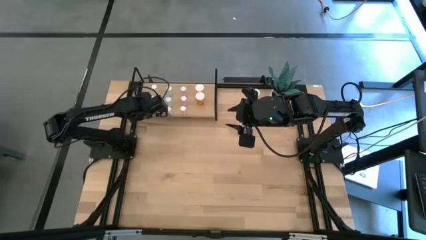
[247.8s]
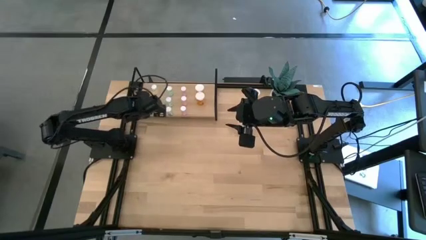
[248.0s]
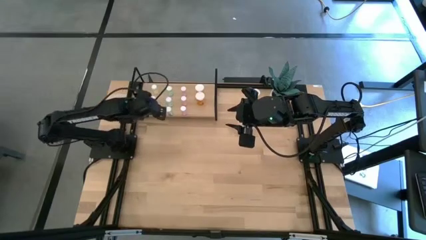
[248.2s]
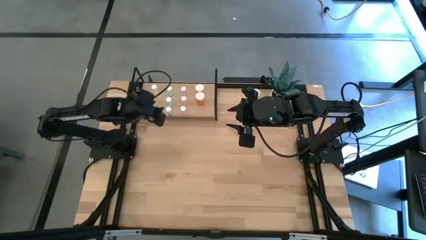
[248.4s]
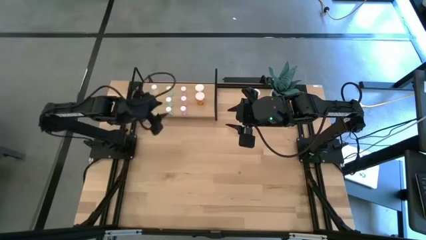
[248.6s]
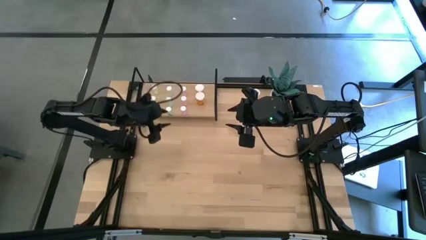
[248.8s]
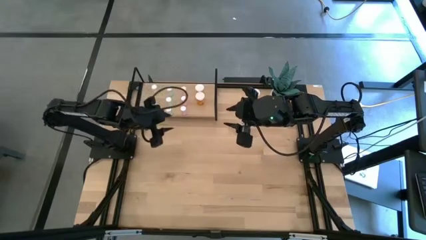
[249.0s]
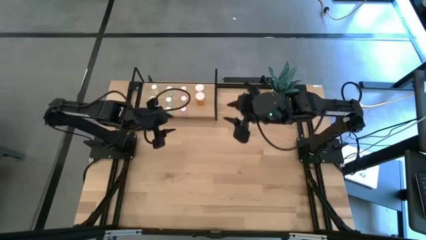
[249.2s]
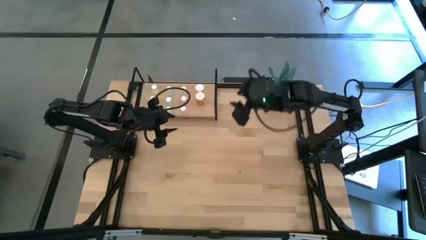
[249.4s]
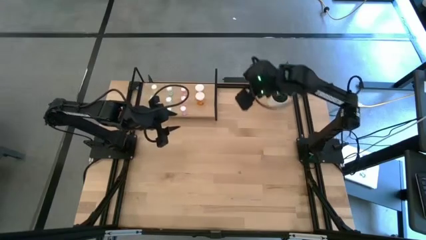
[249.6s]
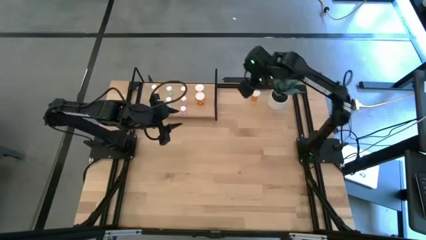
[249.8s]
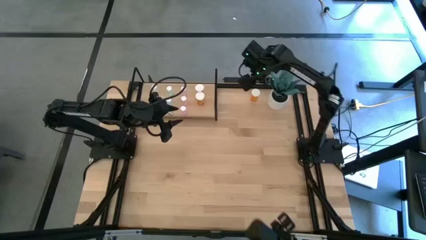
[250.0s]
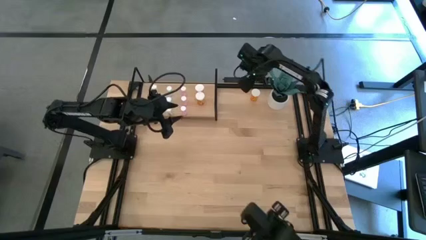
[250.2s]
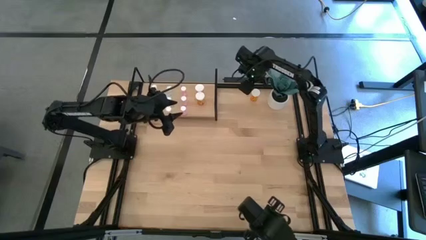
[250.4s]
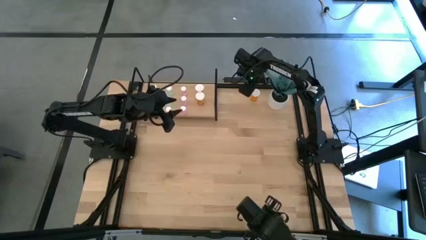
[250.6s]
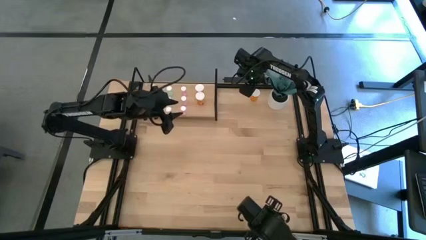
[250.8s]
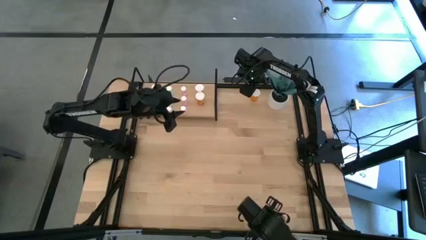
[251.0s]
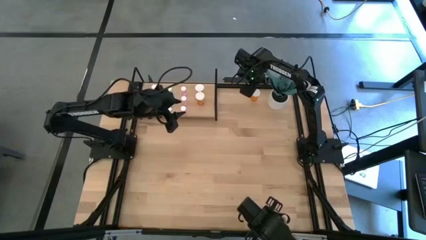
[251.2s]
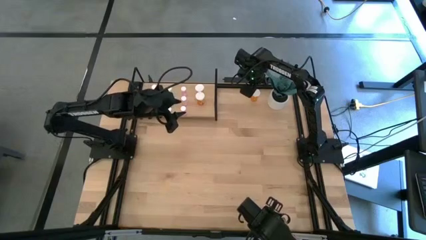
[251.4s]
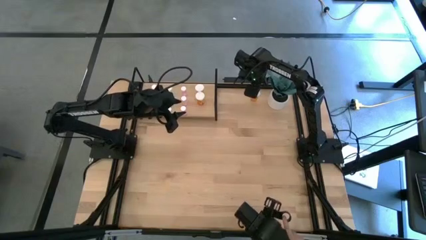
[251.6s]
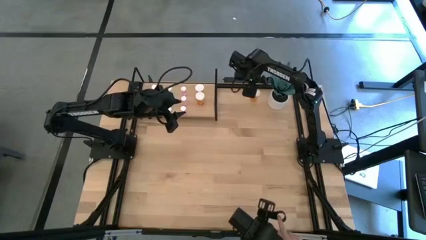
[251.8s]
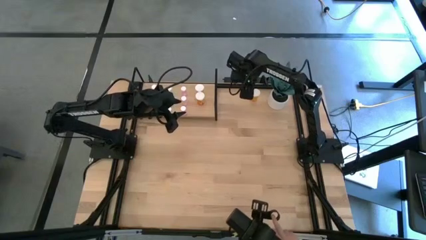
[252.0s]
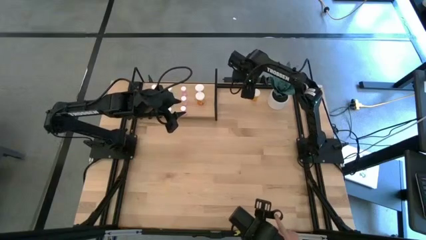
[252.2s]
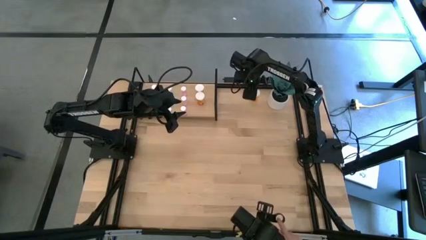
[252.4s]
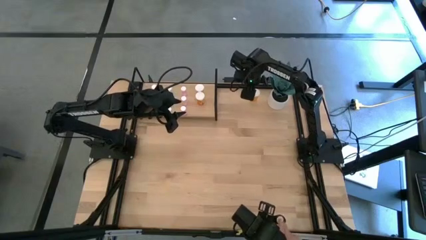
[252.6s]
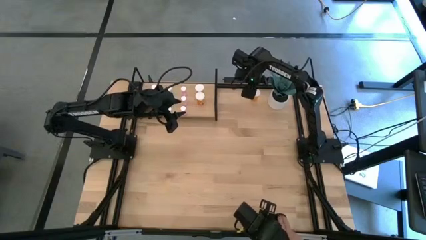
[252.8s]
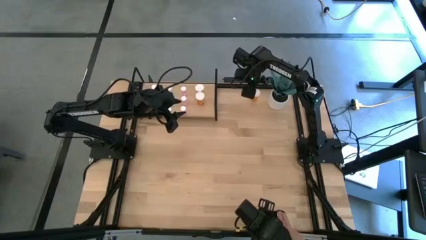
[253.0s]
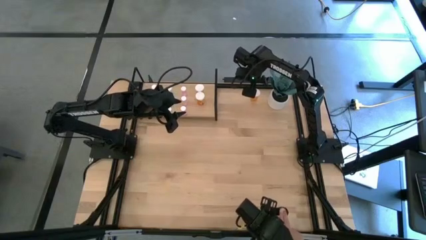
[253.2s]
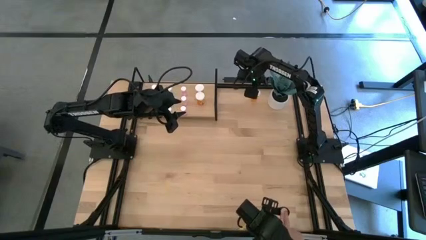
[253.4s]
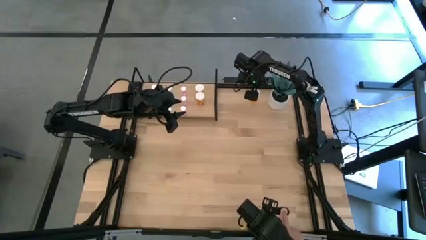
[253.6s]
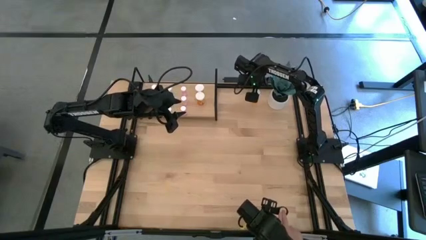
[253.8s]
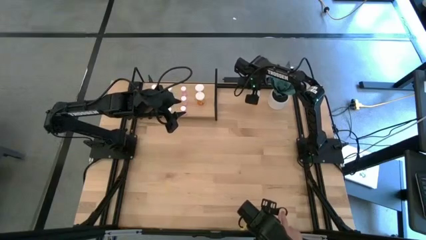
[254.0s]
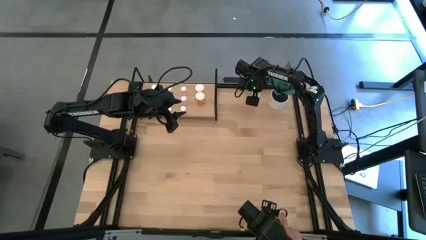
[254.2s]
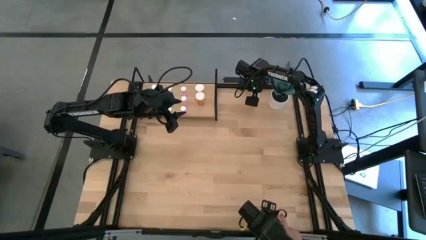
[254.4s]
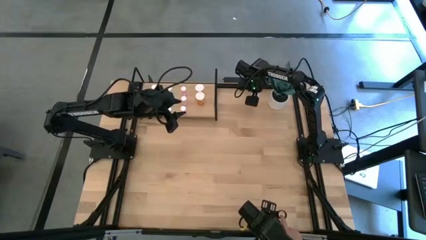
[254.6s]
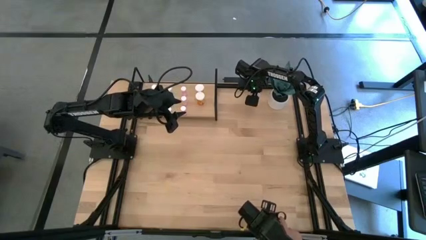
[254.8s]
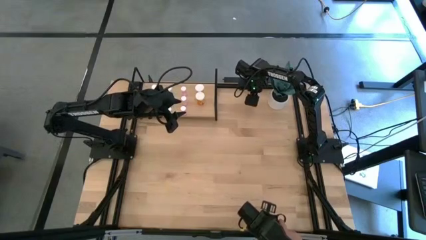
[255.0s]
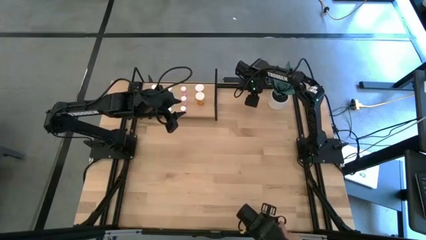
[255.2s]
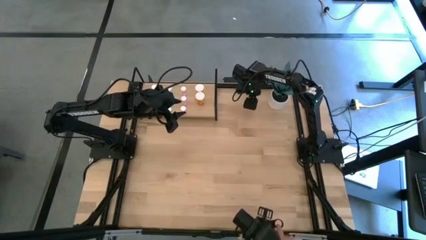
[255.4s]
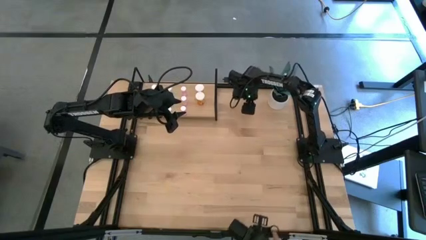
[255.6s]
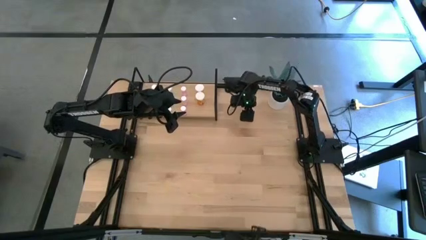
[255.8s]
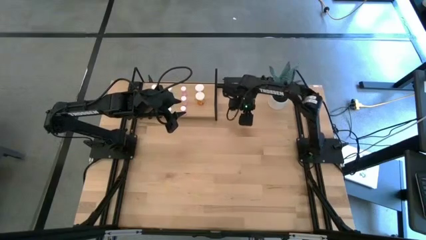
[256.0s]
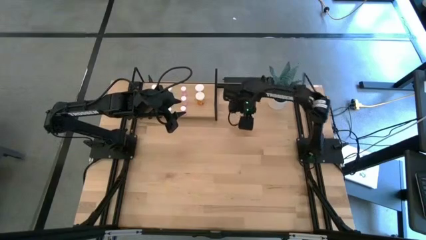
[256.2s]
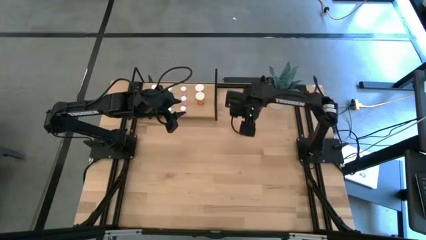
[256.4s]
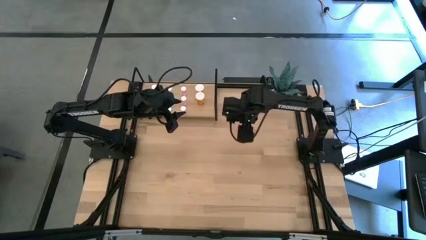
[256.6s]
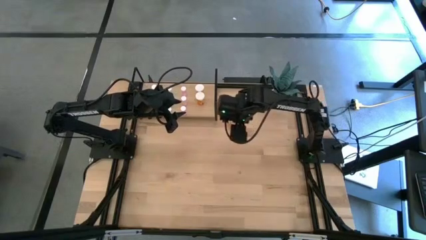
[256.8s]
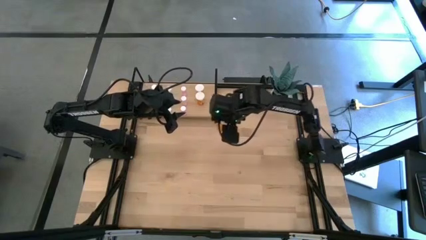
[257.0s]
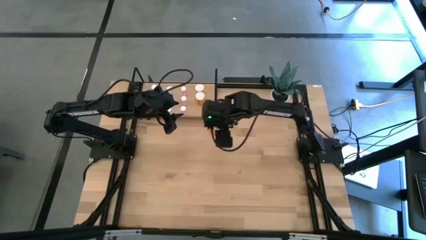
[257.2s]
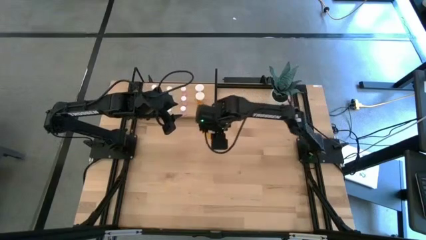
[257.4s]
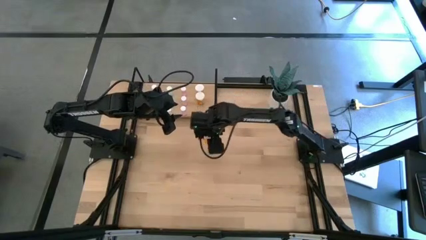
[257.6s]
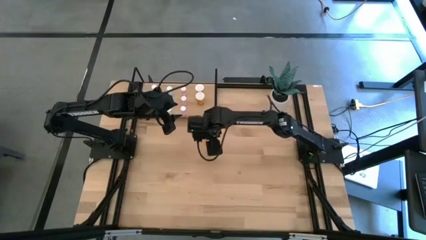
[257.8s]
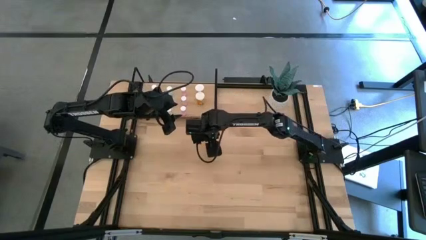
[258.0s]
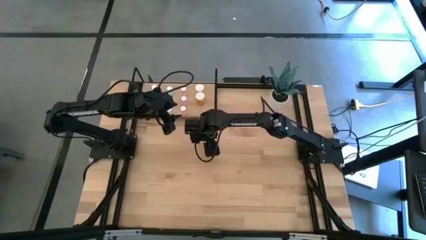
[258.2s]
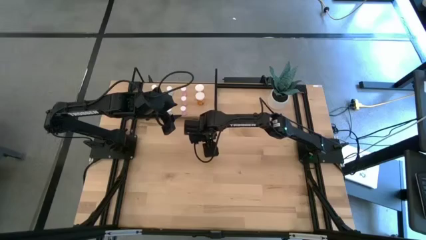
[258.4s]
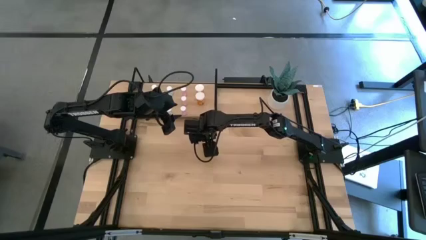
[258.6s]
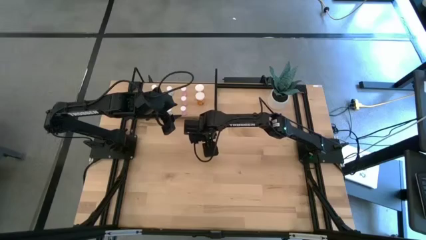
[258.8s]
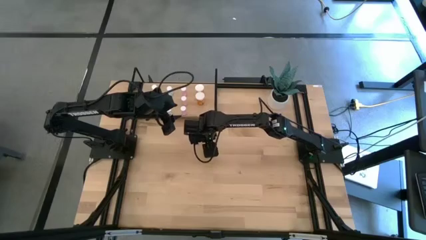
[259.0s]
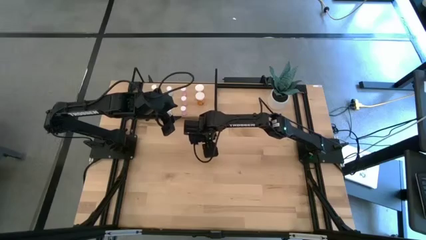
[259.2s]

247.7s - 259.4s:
Task: Pick and place medicine bottles onto shelf by color
Put the orange pill bottle on the shelf and align it with the other orange pill bottles

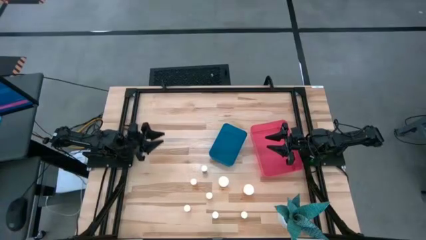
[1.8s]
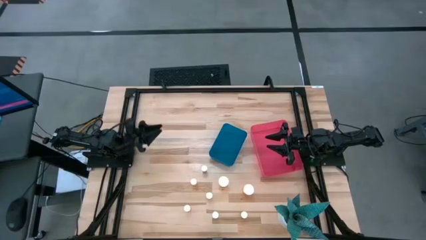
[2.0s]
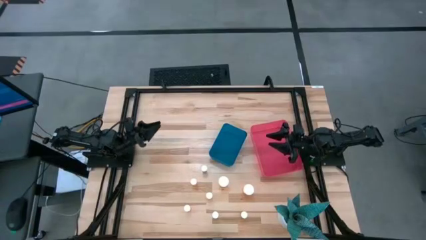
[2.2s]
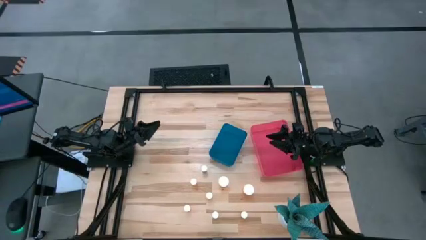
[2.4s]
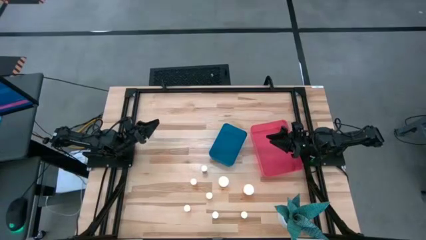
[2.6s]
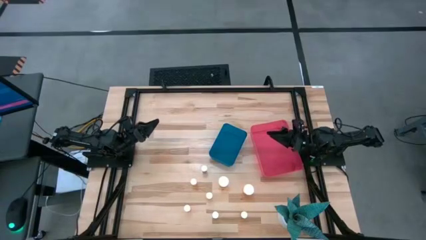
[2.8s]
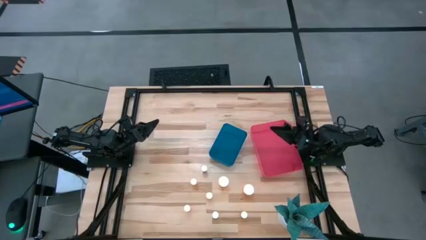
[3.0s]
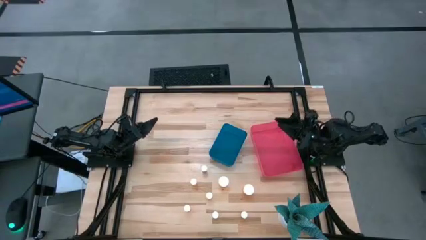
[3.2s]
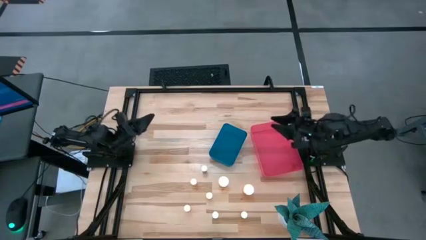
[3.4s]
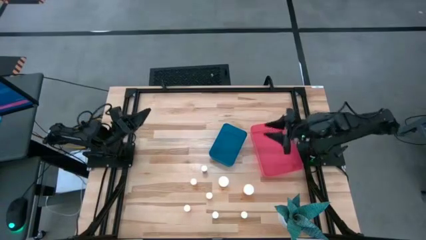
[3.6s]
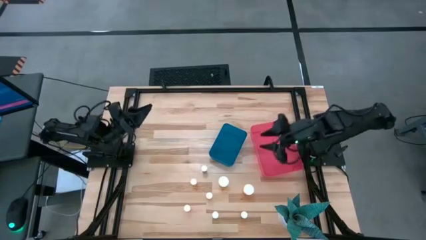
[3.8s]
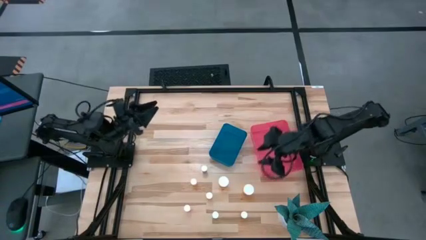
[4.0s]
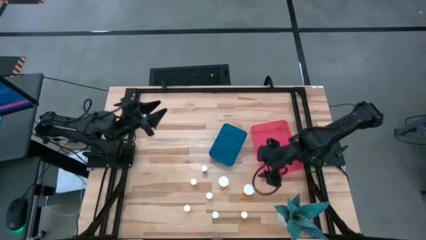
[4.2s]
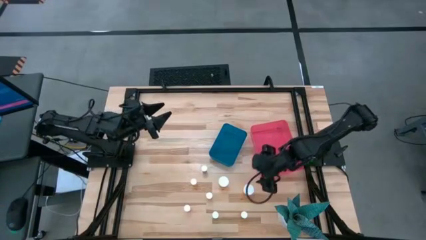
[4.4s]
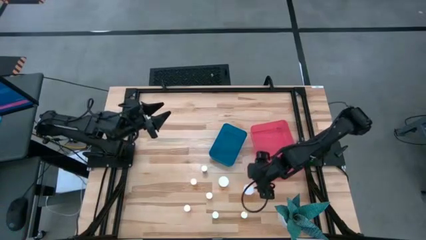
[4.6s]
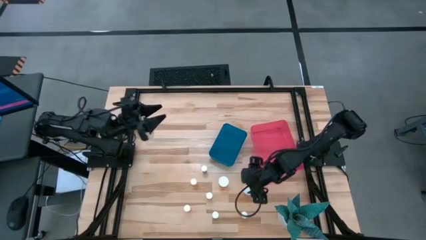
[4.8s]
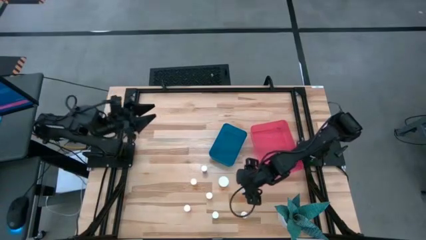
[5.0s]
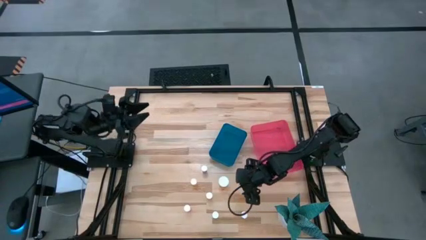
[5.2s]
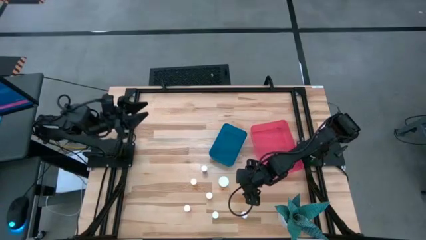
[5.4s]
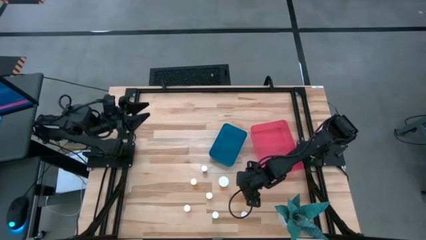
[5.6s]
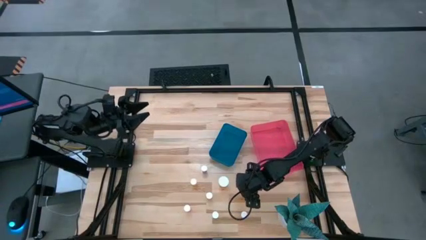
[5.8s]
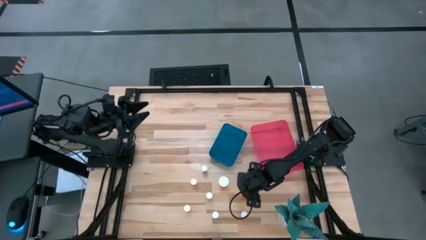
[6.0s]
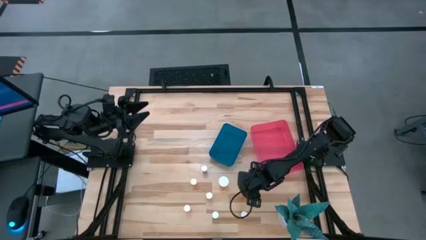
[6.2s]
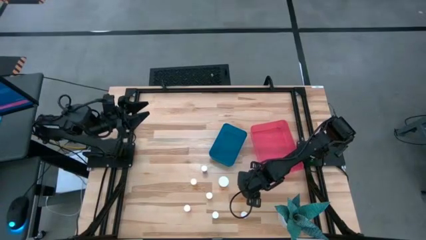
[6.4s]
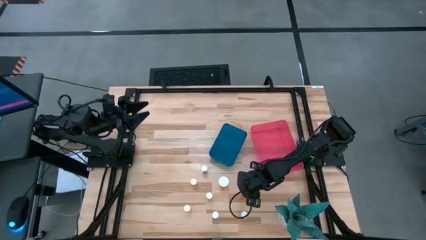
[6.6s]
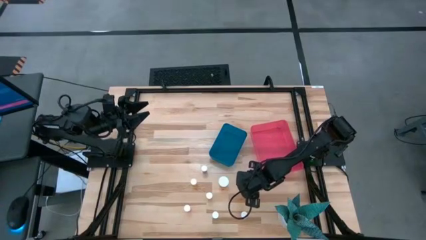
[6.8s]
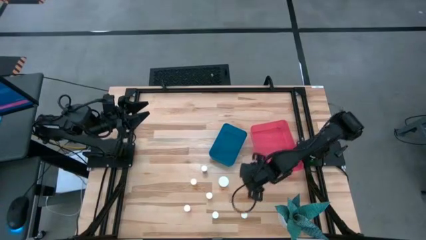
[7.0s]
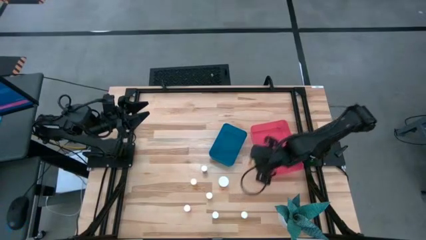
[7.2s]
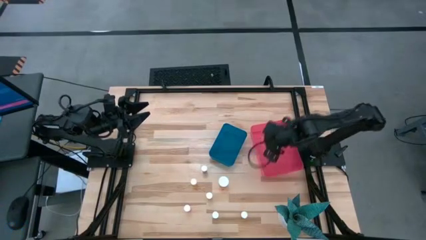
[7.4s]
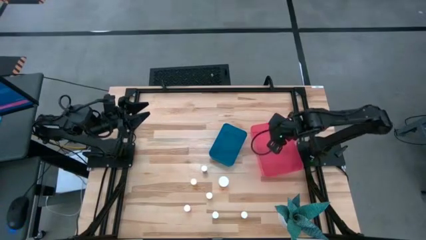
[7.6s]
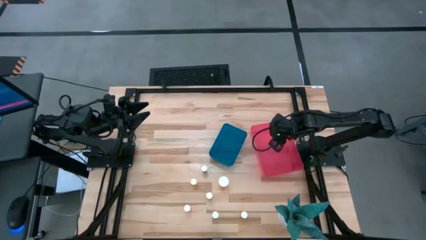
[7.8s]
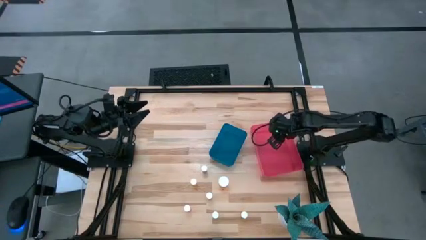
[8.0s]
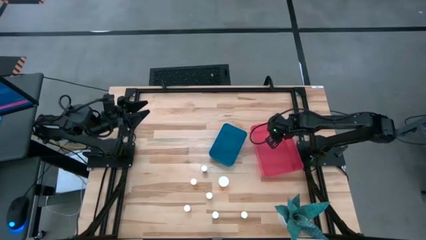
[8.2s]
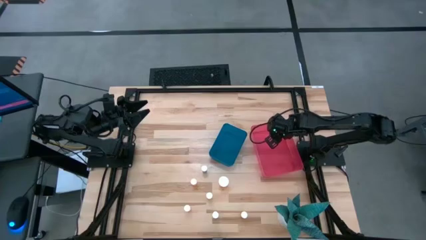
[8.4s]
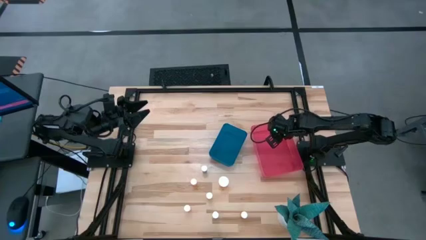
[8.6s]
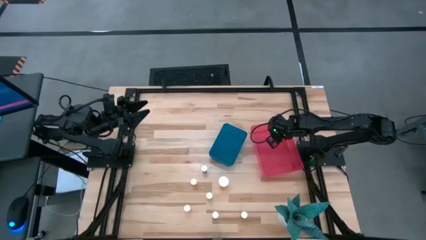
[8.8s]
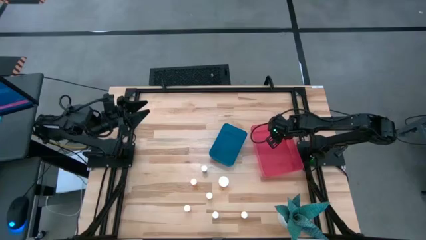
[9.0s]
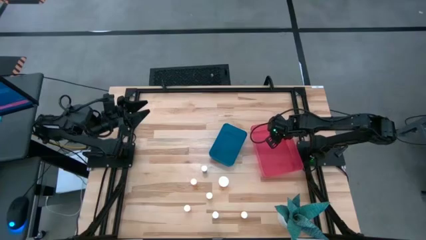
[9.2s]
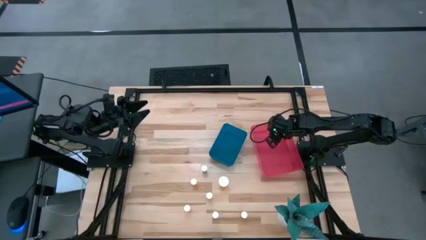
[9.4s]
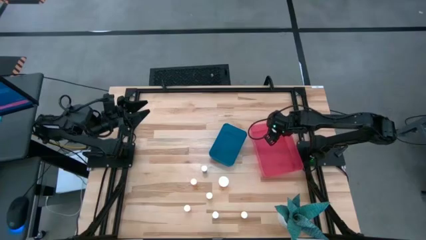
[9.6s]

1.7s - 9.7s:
Task: Pick and place medicine bottles into bin by pill shape (circle, oval)
Put the top right orange capsule bottle into the pink bin
